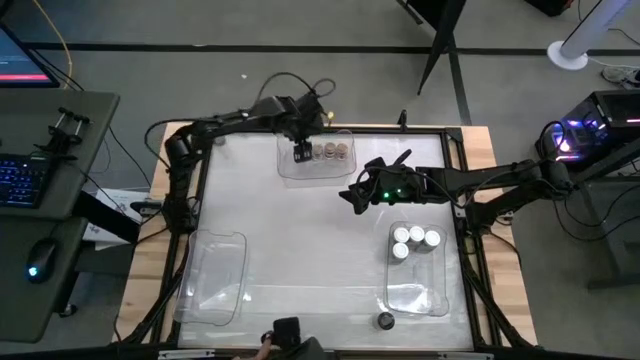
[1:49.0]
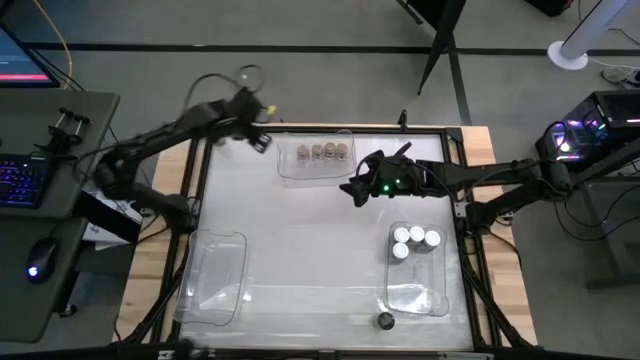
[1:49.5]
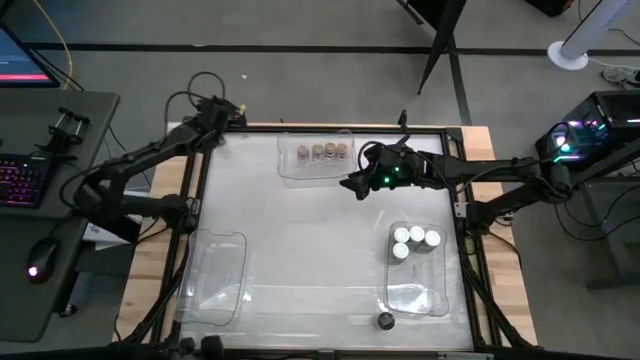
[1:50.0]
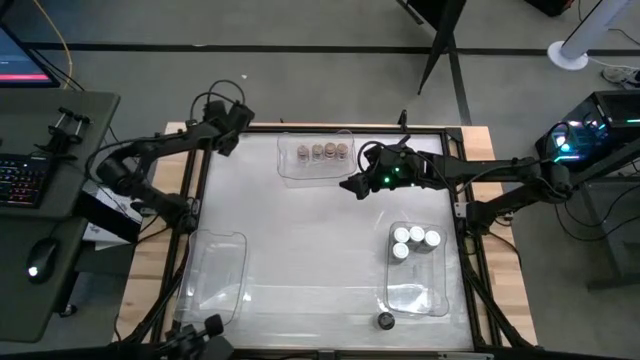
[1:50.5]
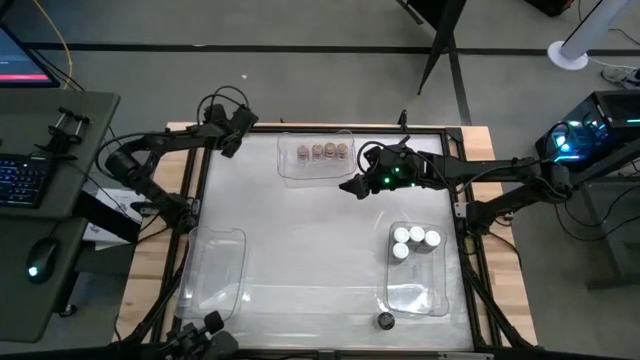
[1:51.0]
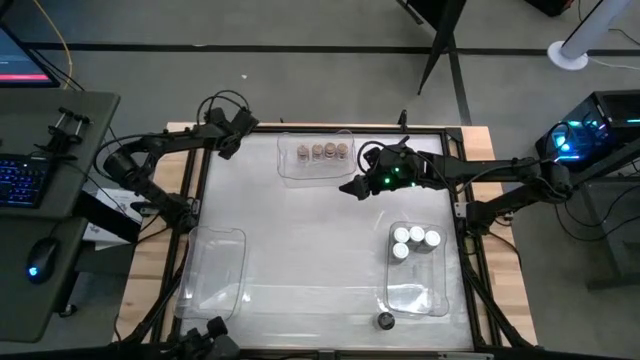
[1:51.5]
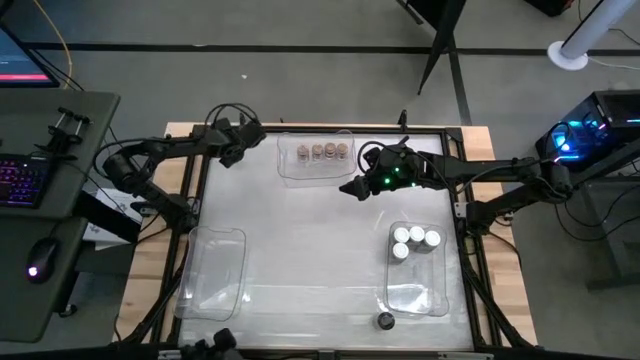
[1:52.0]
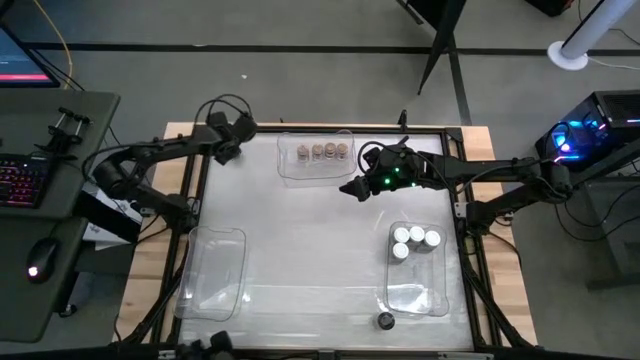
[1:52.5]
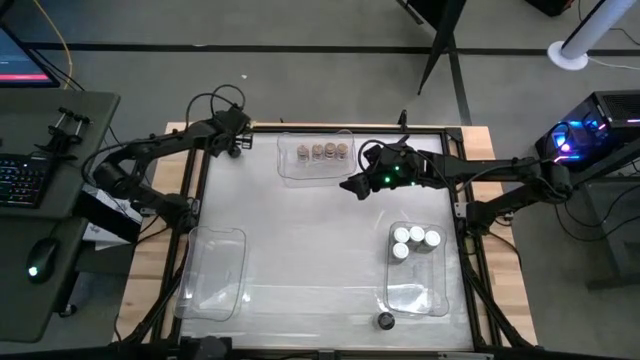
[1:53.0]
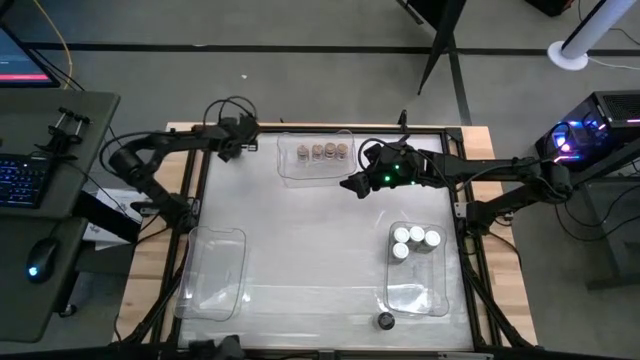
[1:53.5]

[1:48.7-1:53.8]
Task: Sort spices by type
Put the green seasoning bottle into the bottom left transparent bin

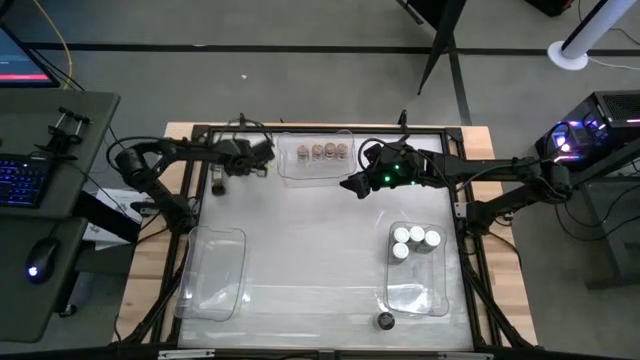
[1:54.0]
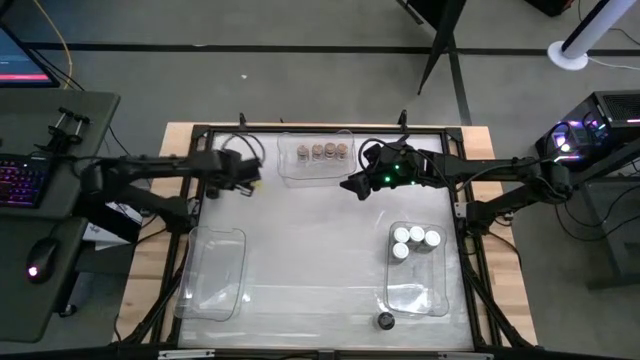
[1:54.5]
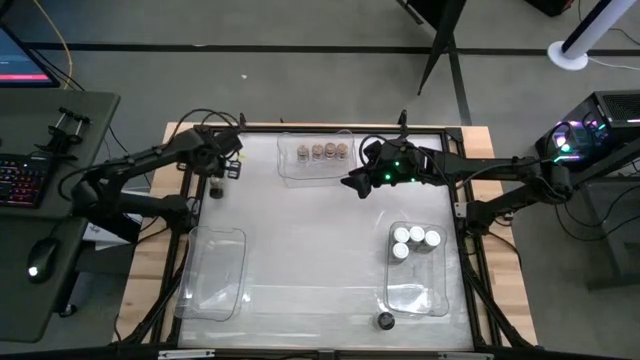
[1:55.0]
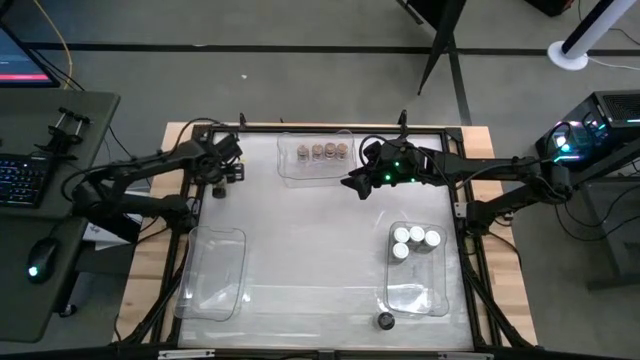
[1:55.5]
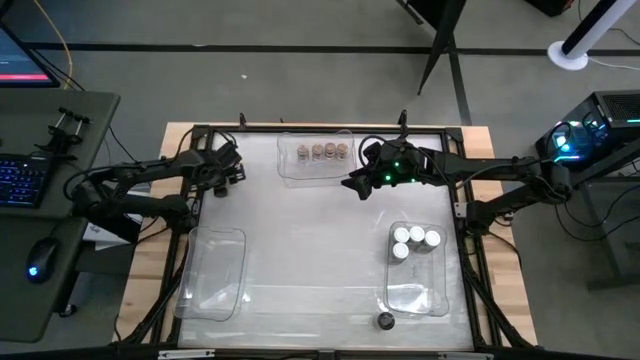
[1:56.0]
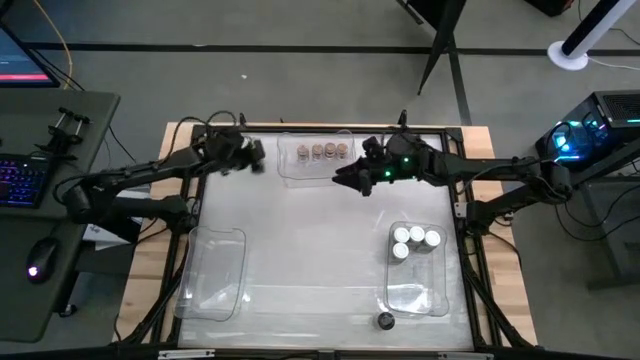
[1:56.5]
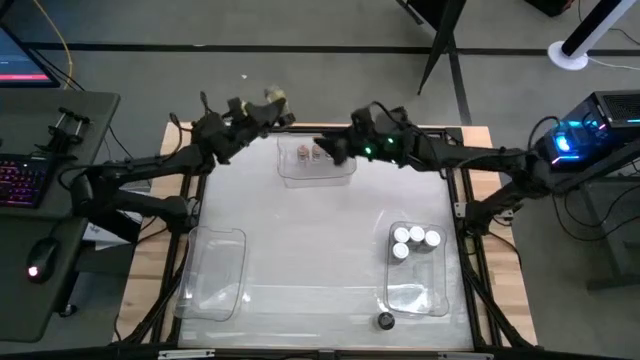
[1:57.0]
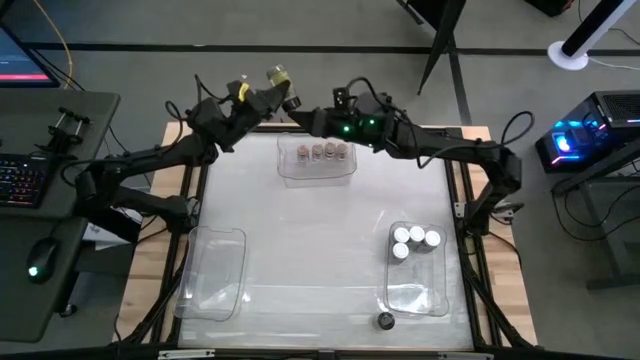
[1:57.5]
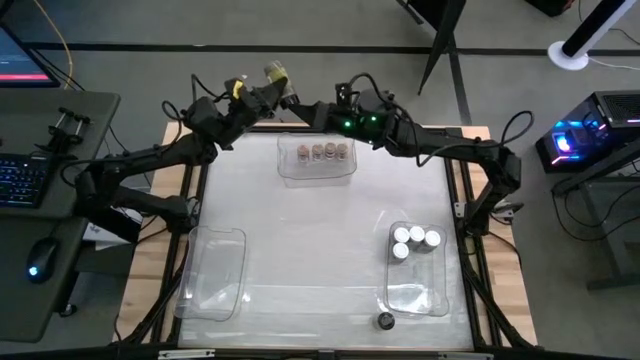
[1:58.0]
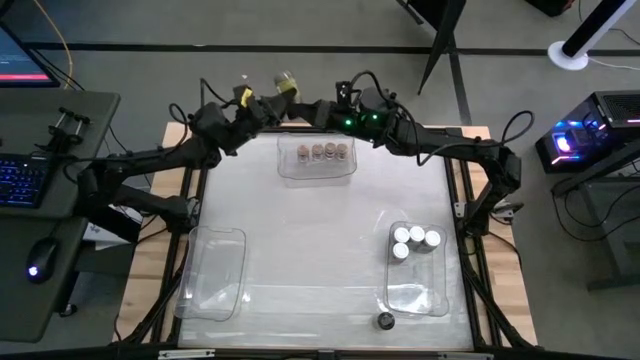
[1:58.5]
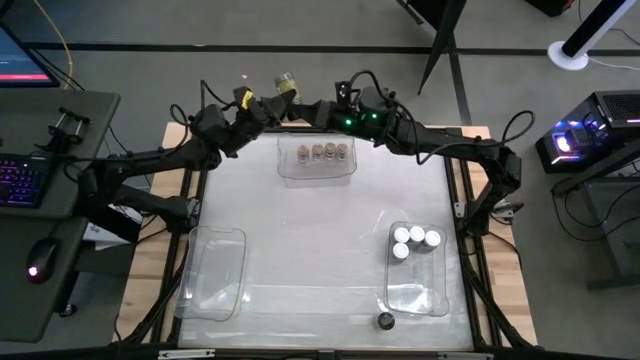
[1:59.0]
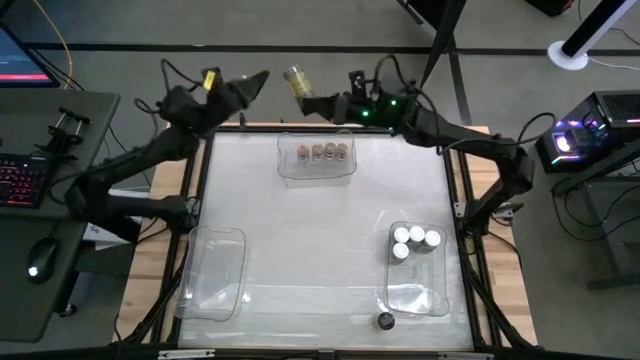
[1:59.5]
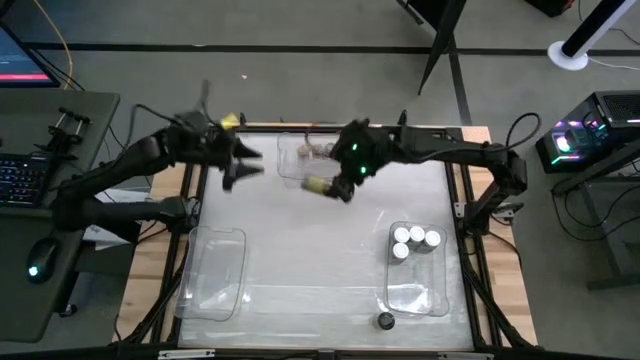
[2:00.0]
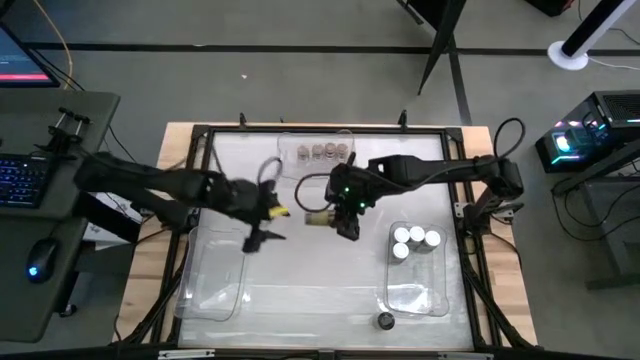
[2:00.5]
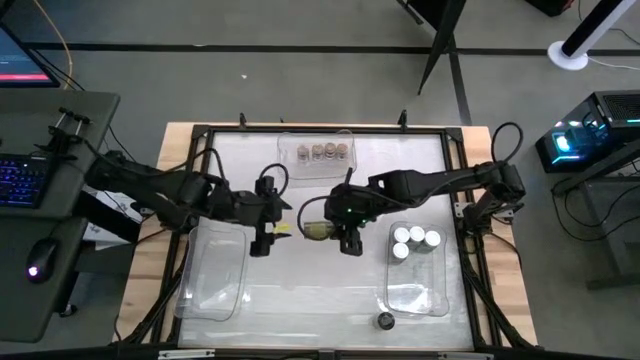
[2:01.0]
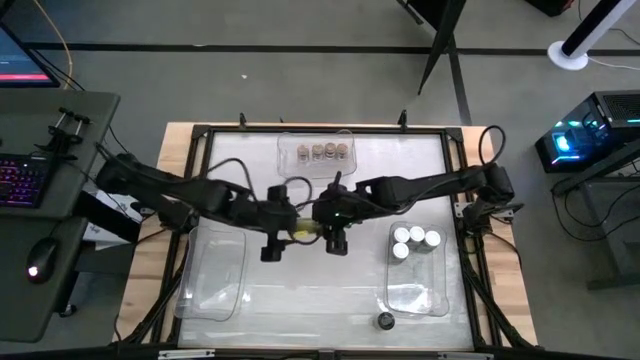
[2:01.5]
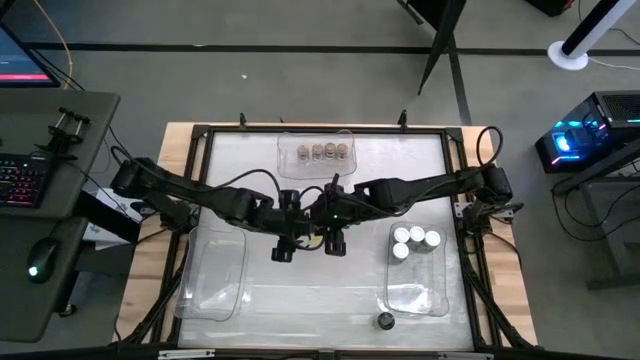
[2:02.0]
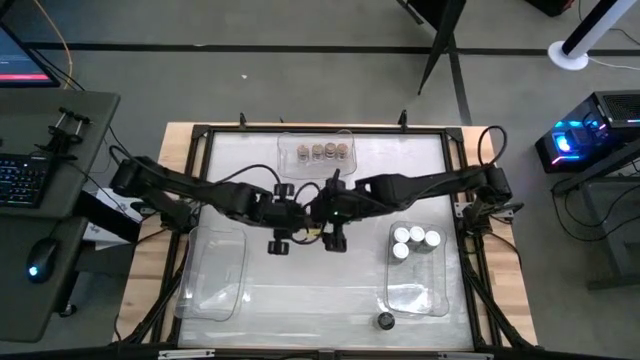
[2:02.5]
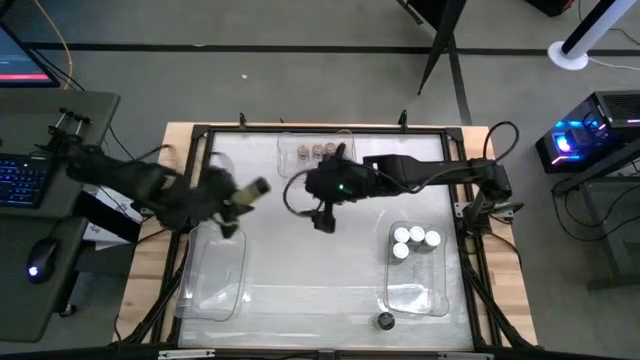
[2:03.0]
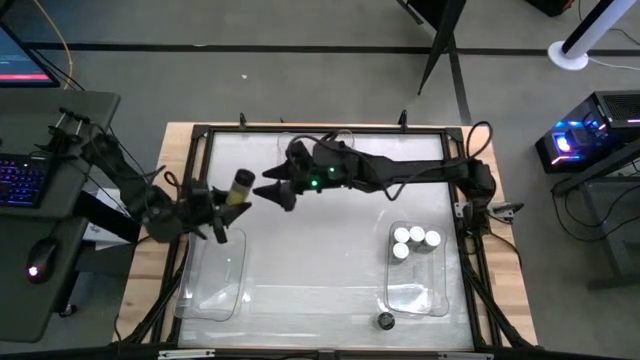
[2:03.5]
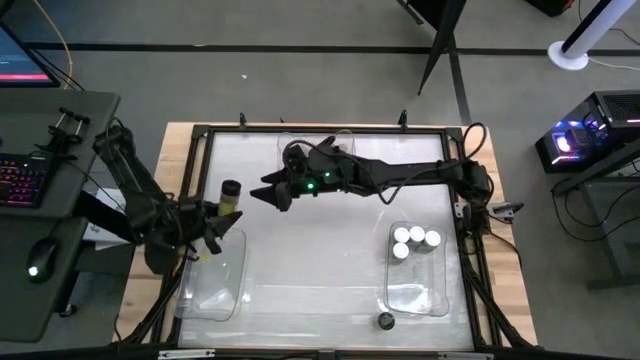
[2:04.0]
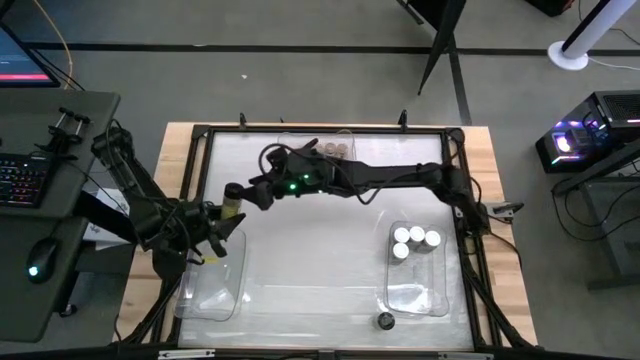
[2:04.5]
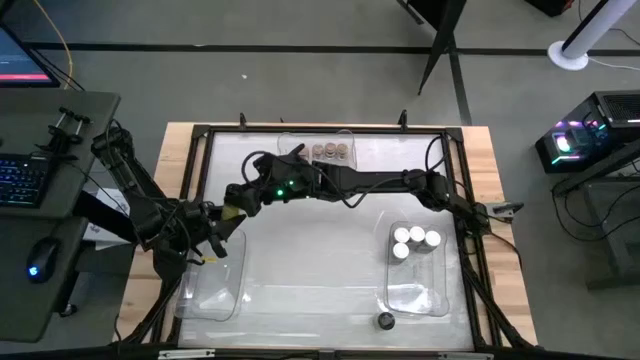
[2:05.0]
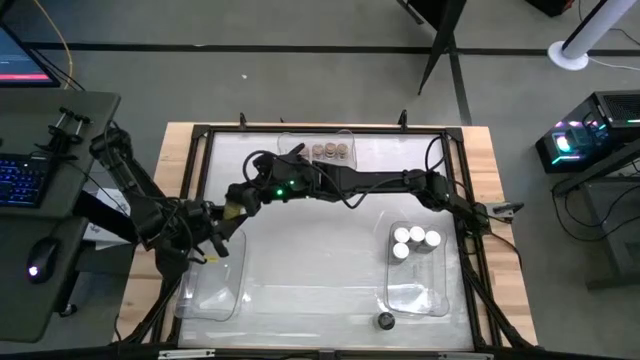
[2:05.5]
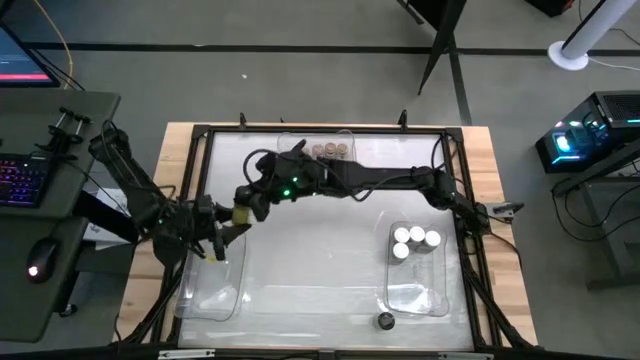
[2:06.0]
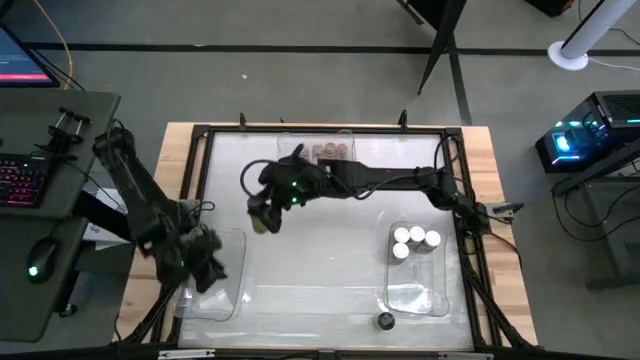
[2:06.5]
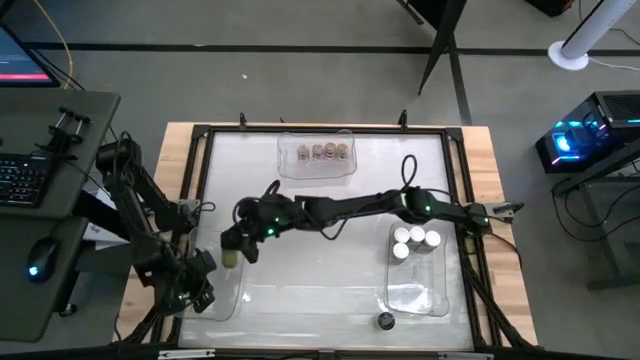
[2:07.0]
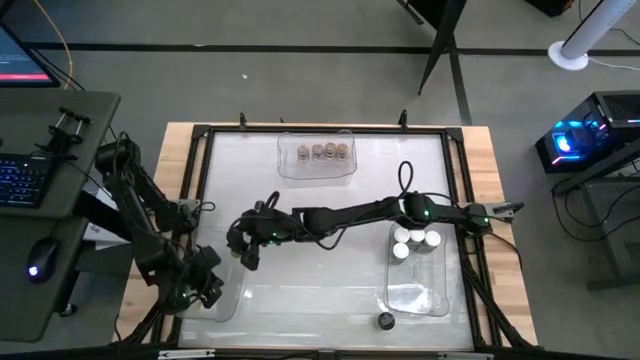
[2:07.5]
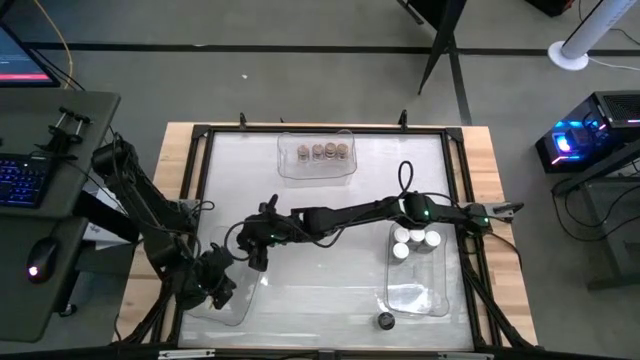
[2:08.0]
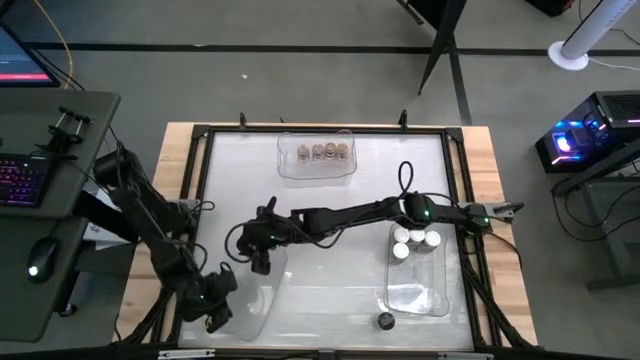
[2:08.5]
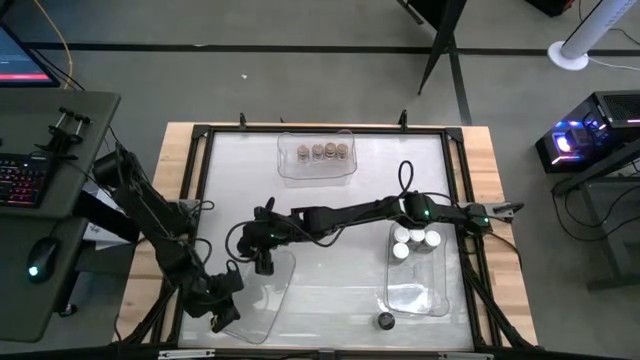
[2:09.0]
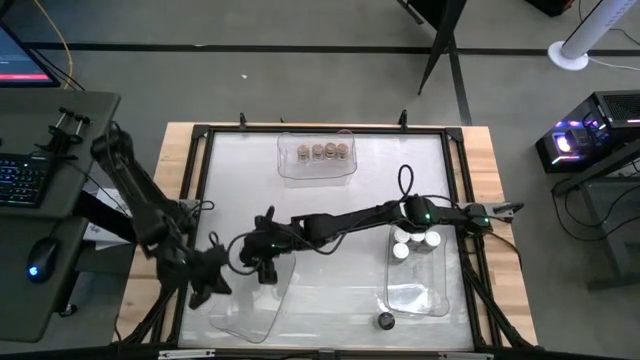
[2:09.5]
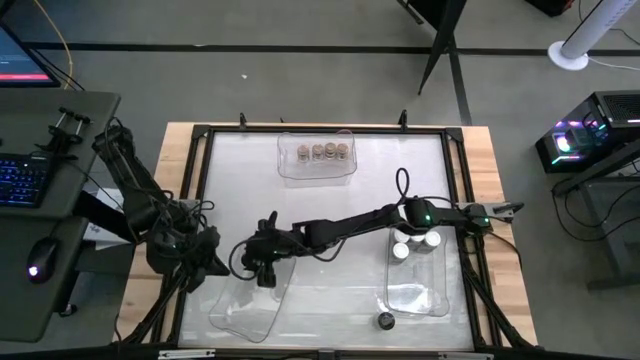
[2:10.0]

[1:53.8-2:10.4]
Put the green seasoning bottle into the bottom left transparent bin

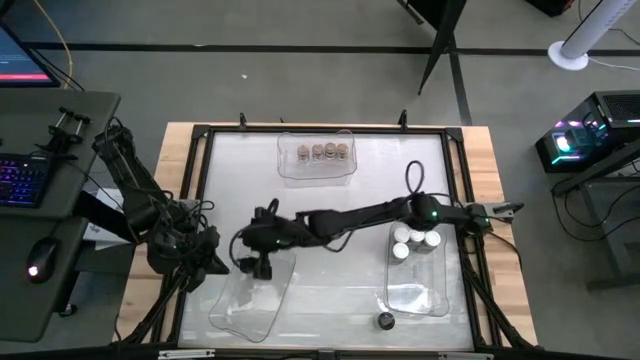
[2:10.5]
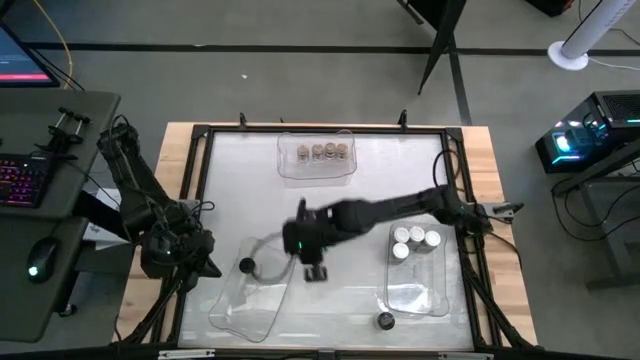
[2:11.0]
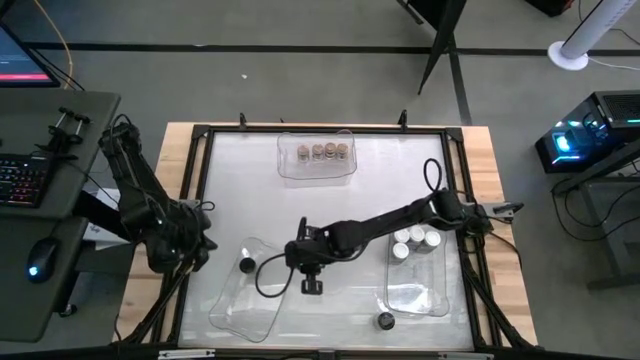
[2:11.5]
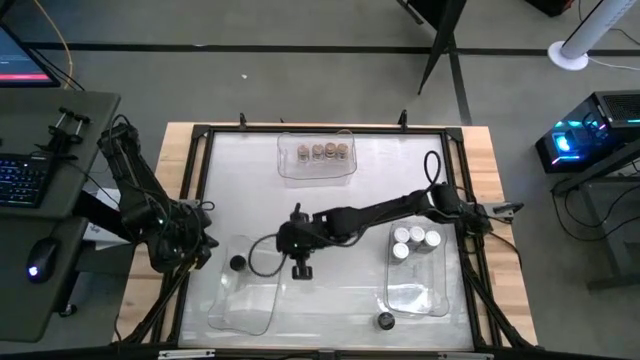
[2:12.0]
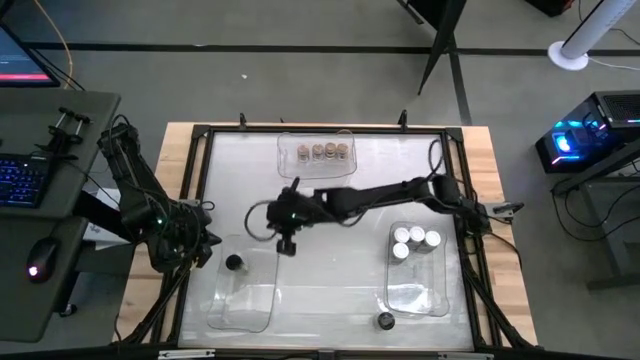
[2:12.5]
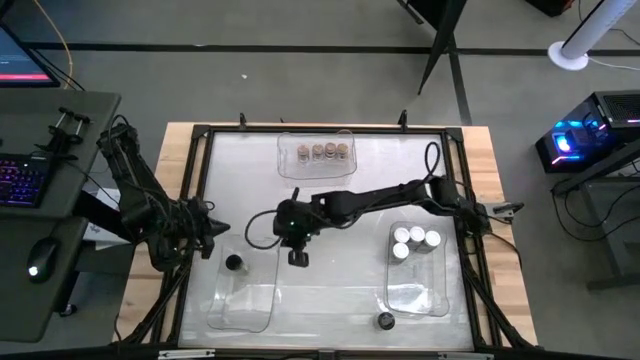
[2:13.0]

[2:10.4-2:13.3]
Adjust the bottom left transparent bin
